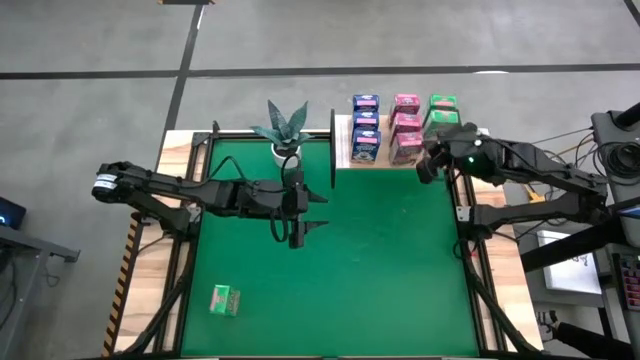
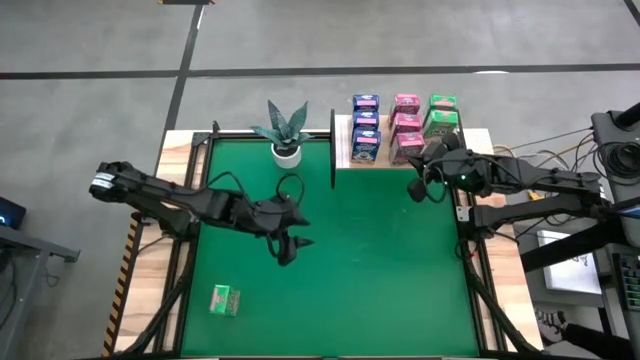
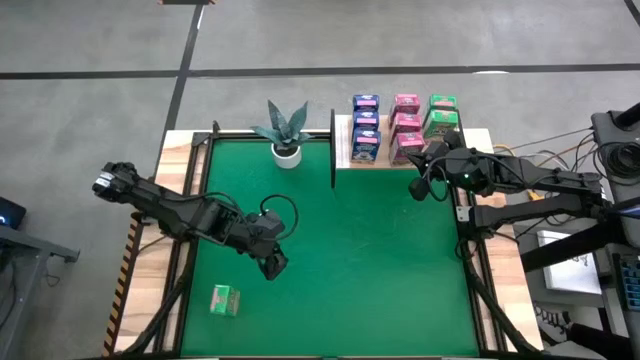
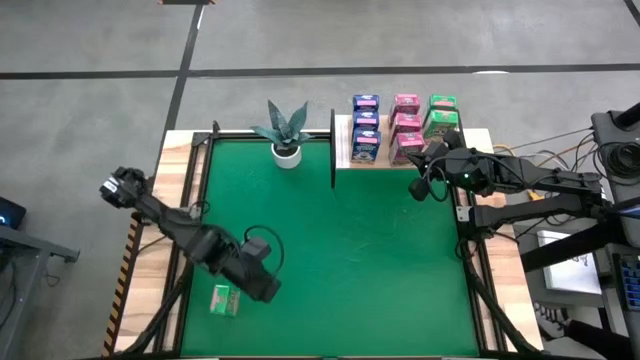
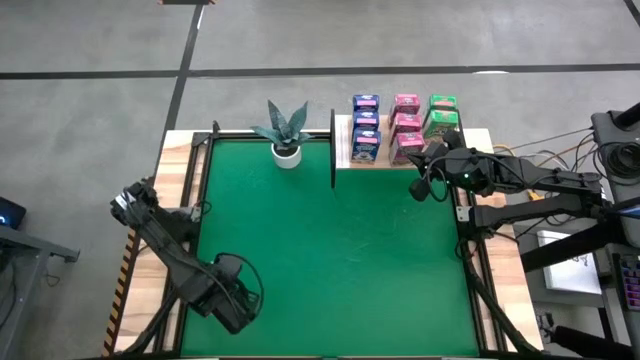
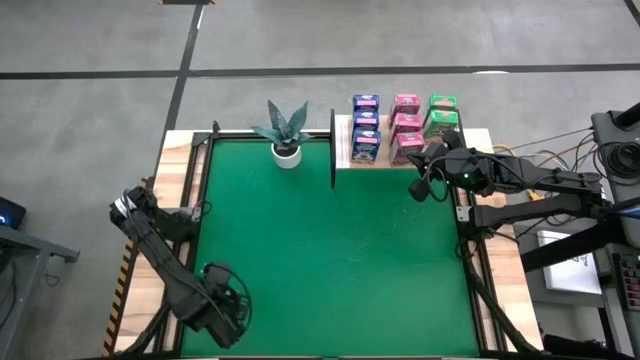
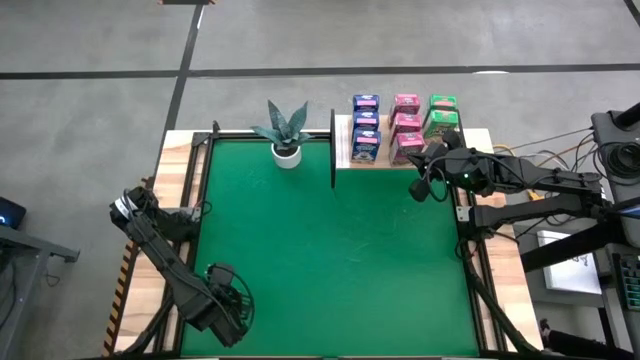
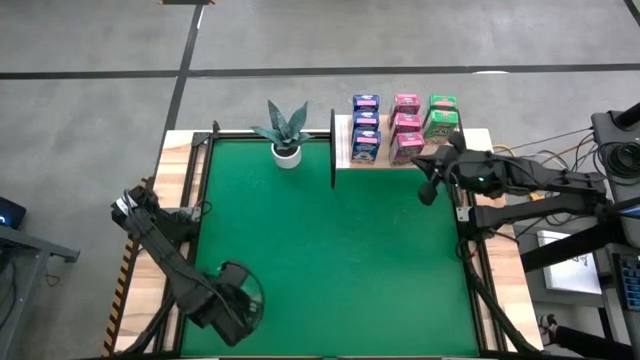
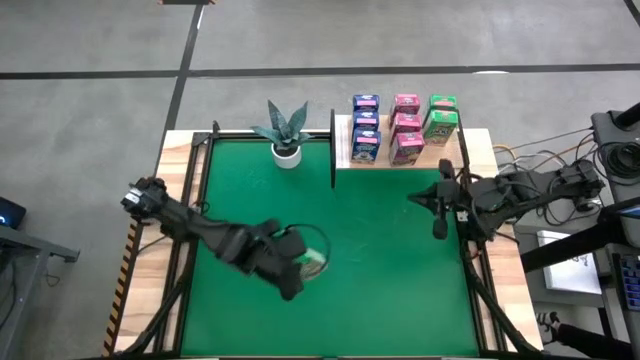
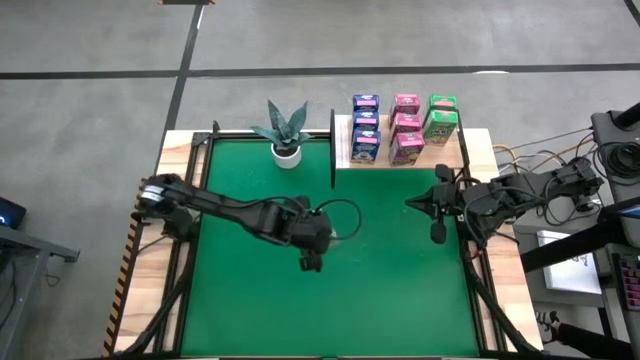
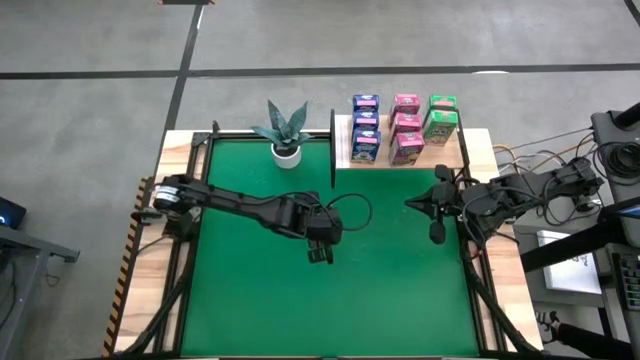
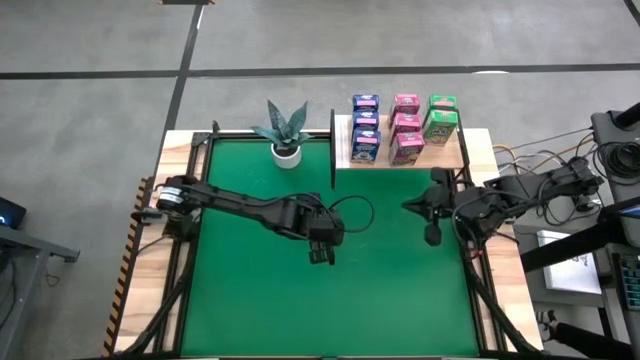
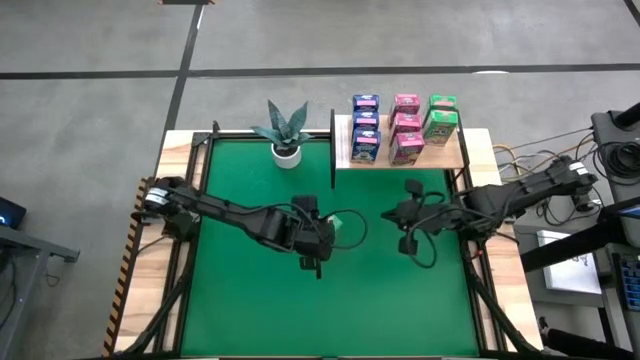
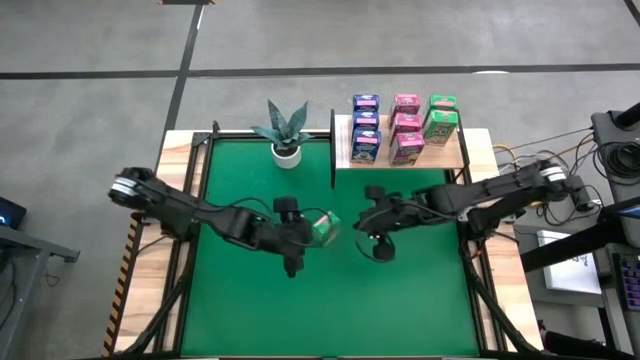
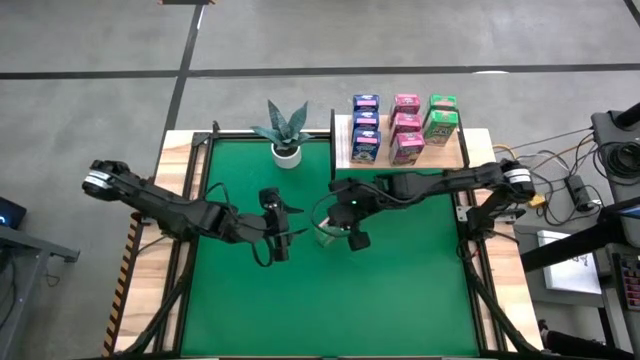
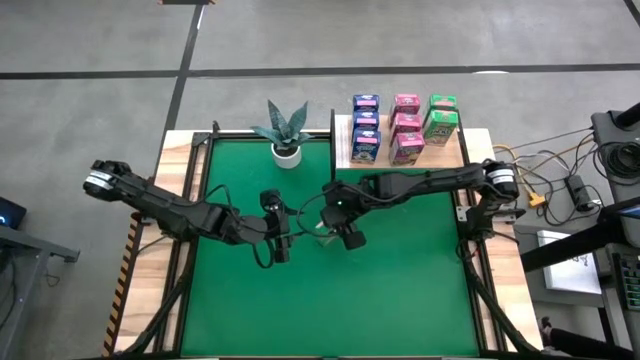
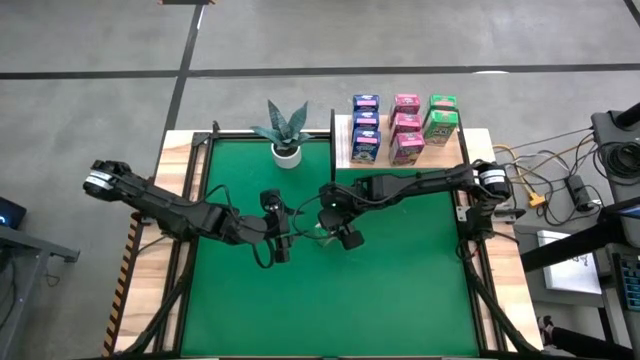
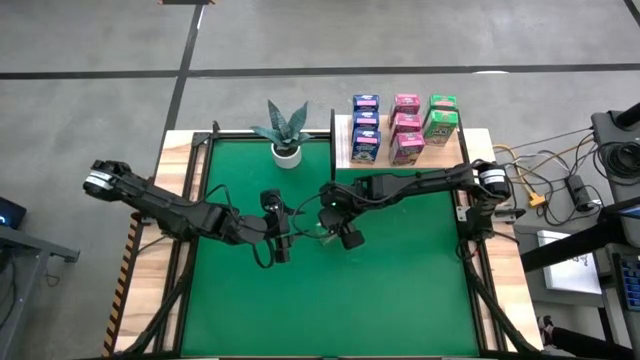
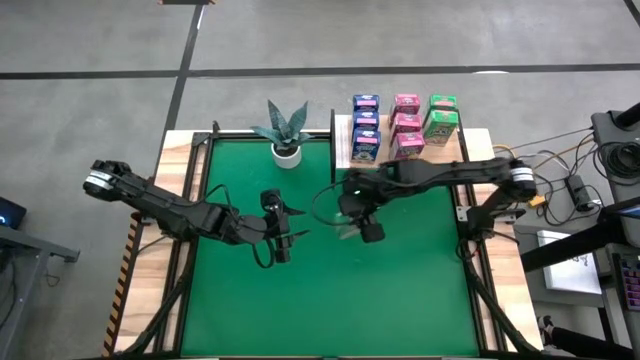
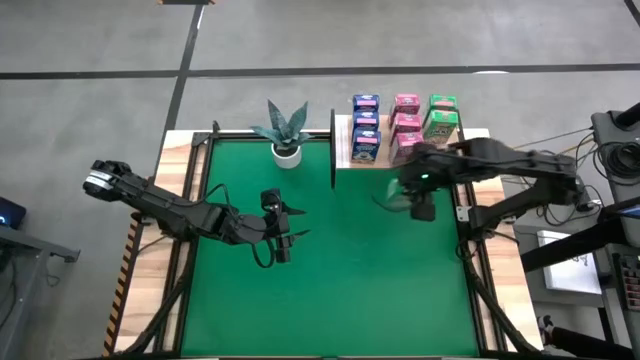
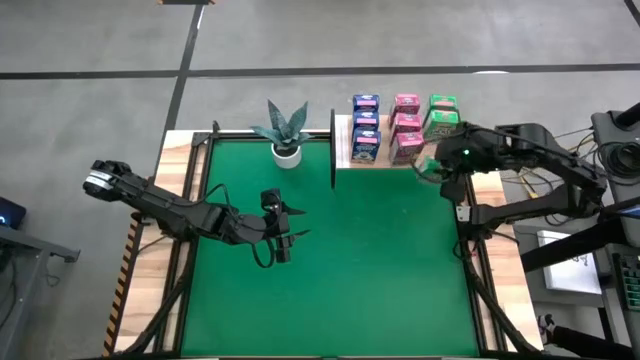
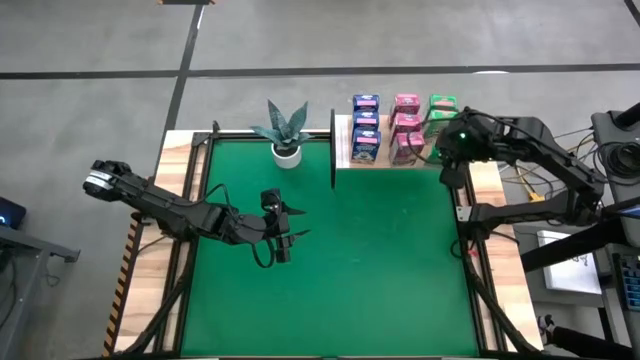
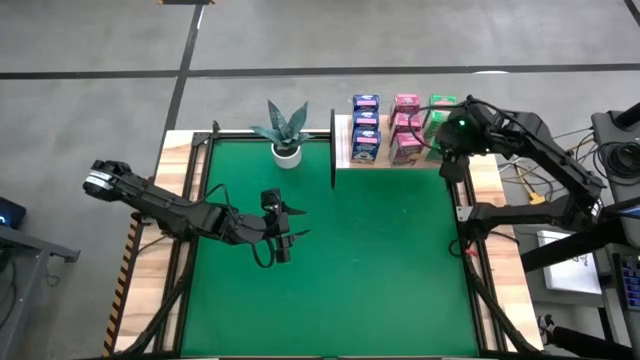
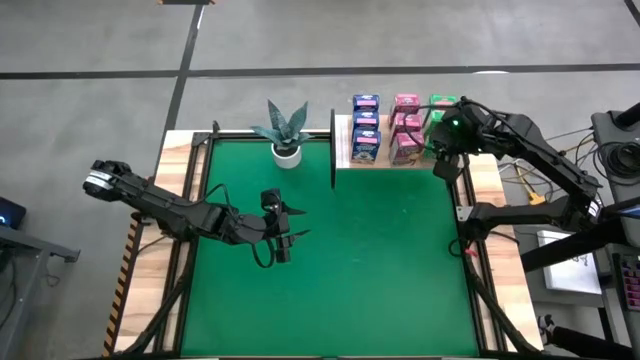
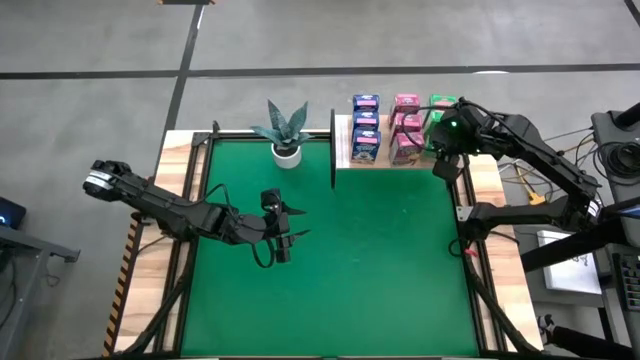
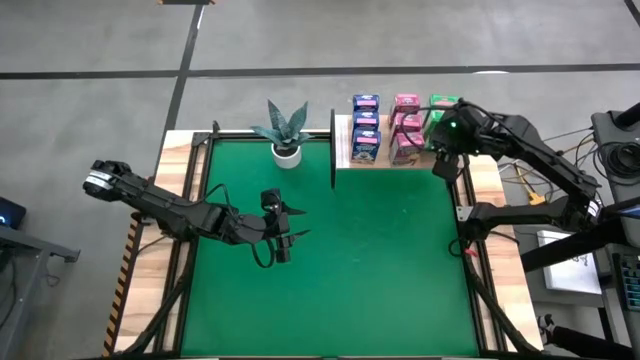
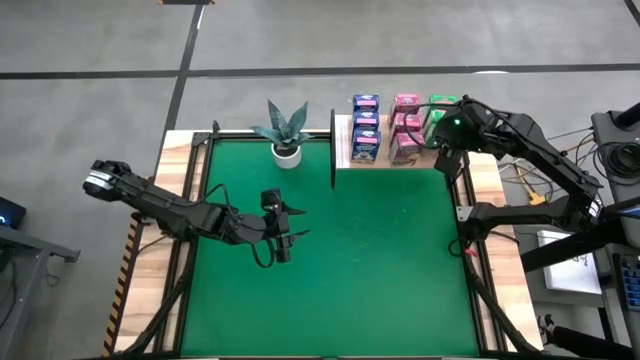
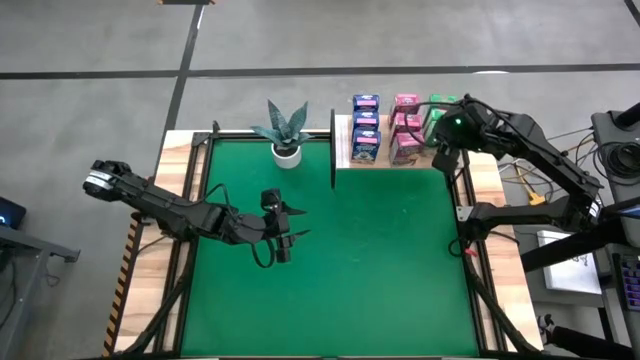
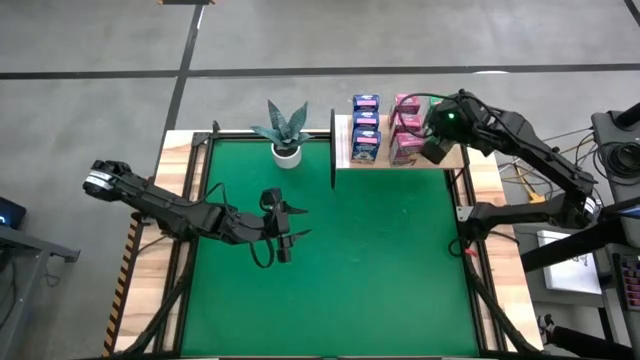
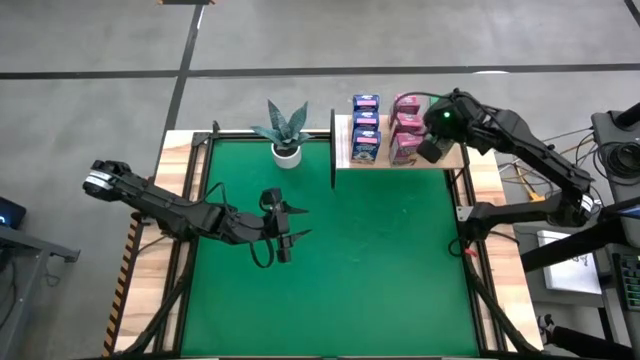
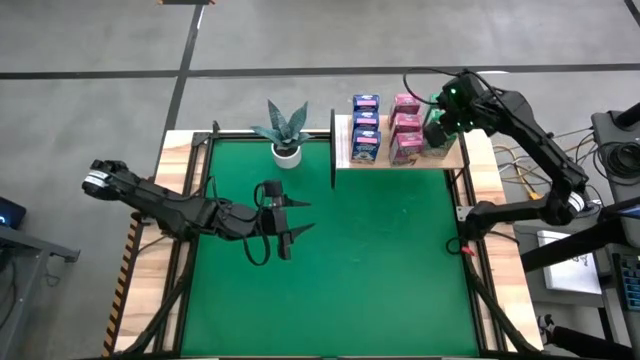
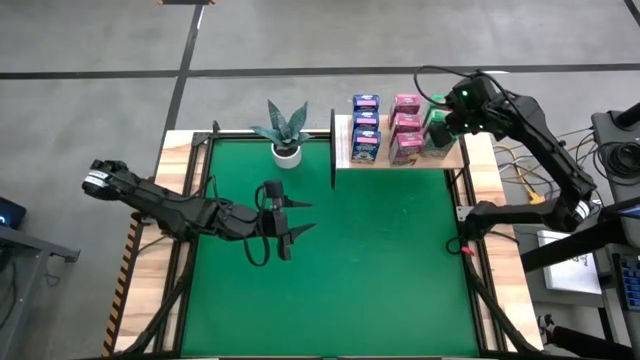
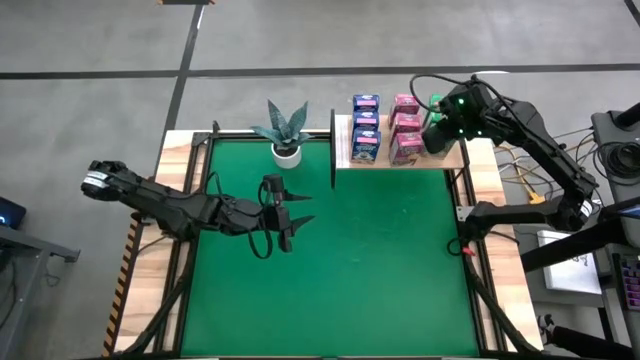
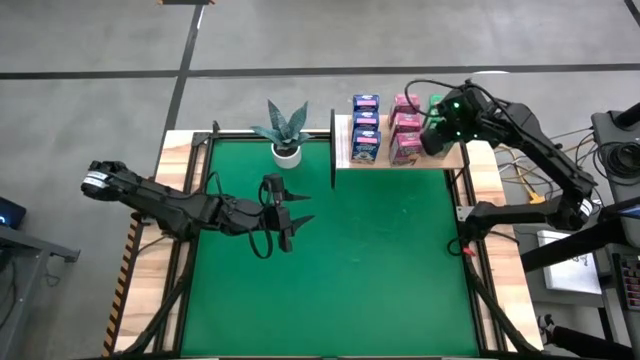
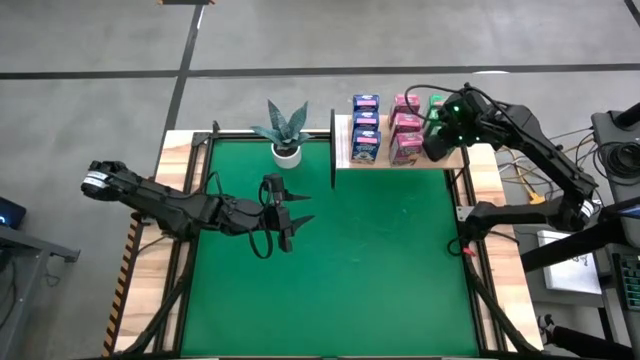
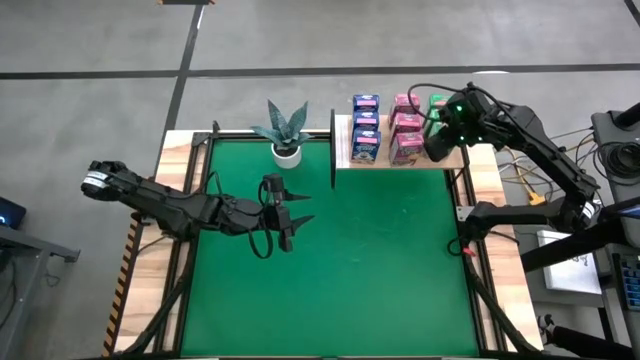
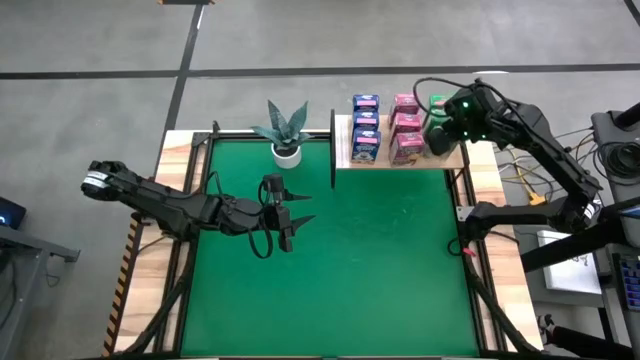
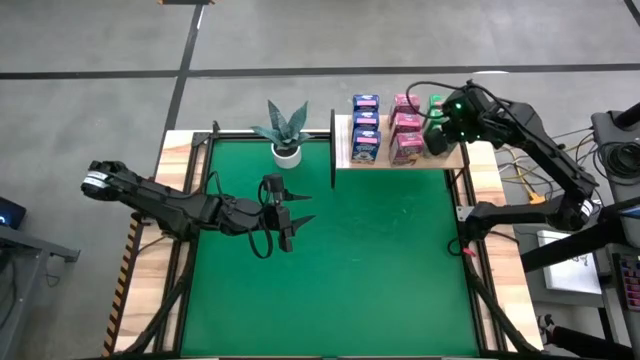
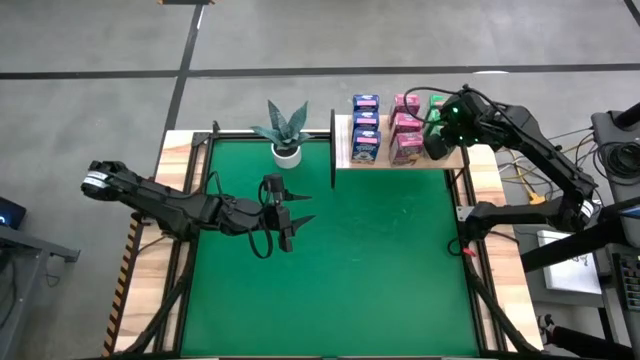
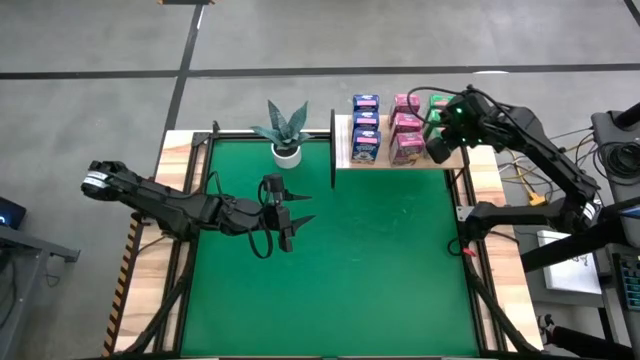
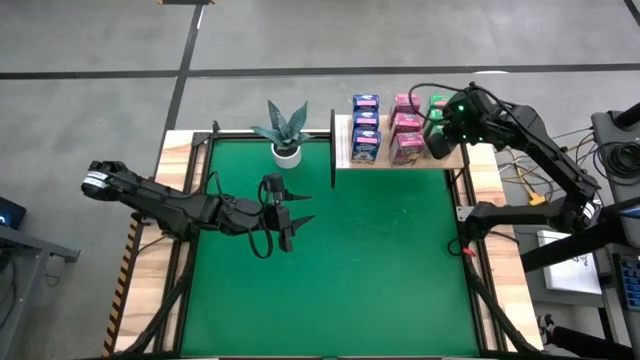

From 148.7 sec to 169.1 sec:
Task: Stack cereal on shelf
Put the green cereal box on the shelf aligned with the other green cereal boxes

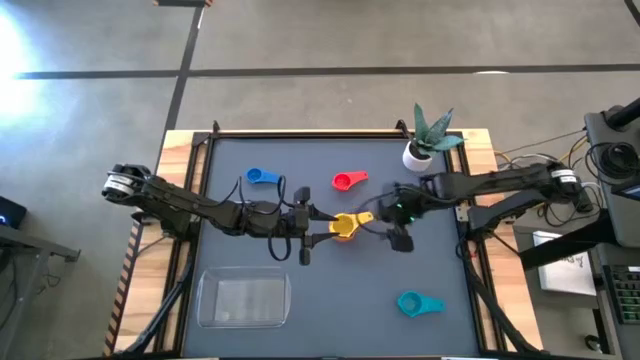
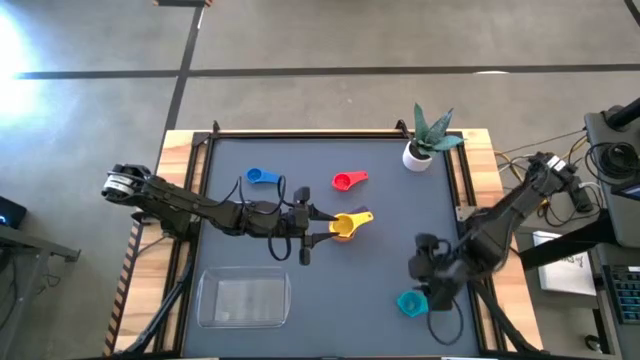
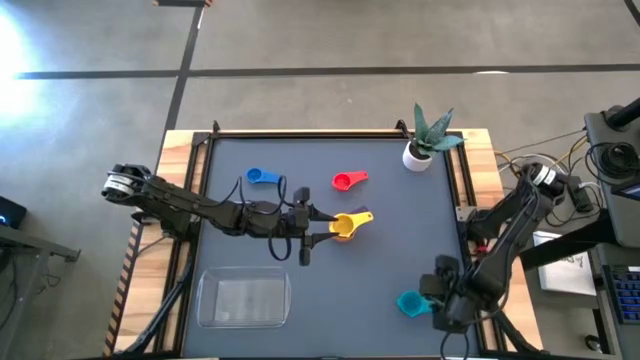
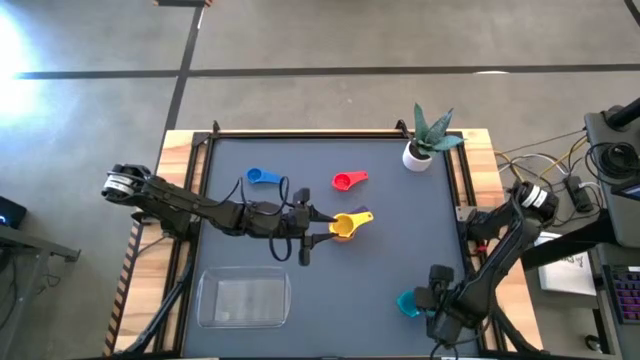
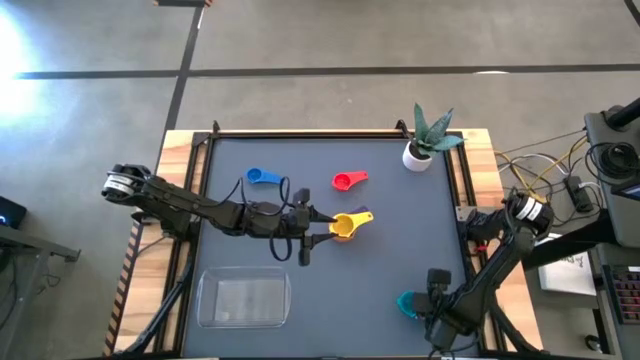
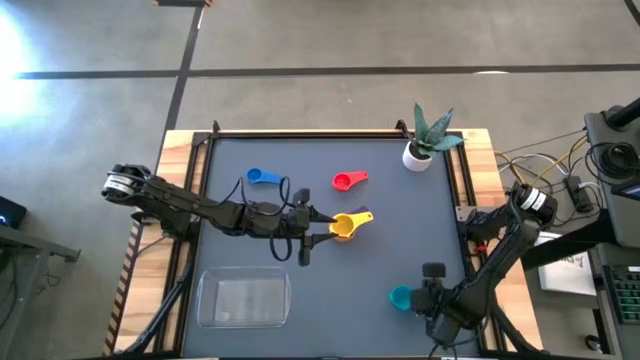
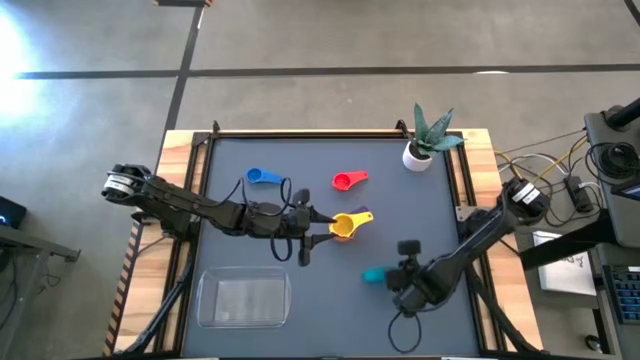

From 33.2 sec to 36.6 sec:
Task: Nest measuring cups in basket
Stack the light blue measuring cup on top of the yellow measuring cup
